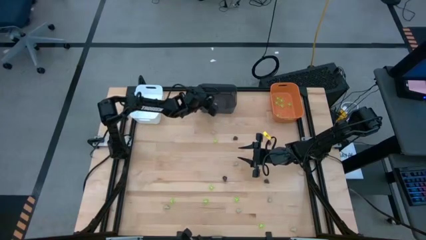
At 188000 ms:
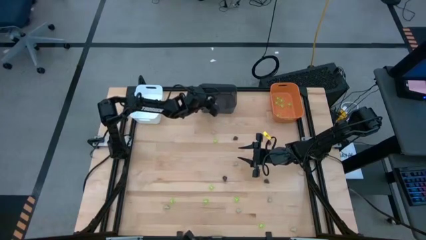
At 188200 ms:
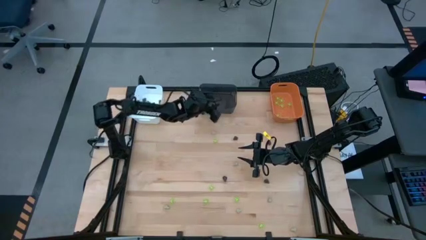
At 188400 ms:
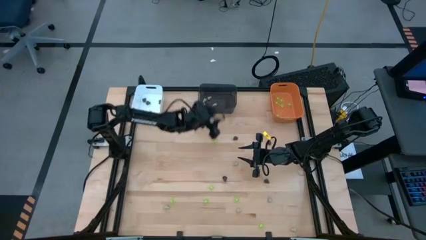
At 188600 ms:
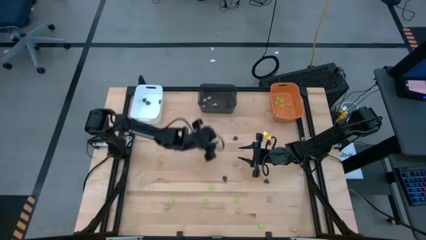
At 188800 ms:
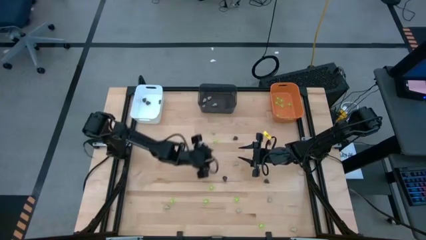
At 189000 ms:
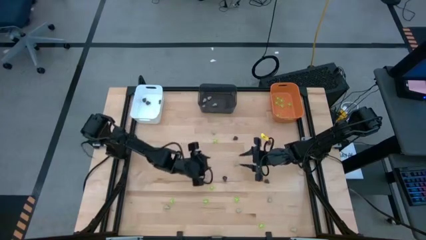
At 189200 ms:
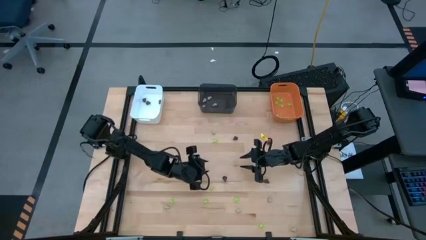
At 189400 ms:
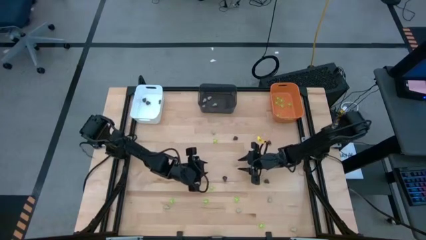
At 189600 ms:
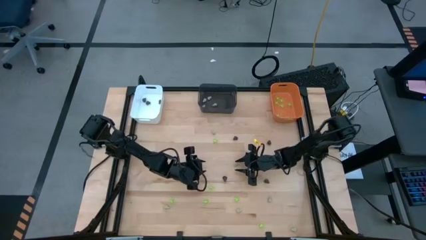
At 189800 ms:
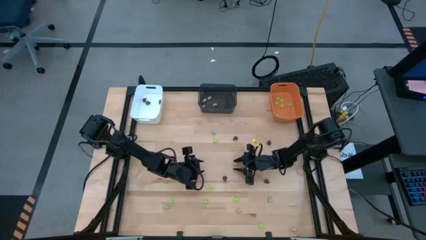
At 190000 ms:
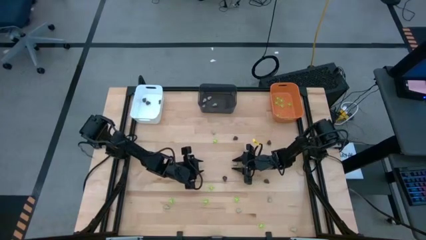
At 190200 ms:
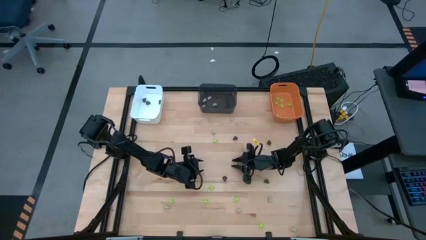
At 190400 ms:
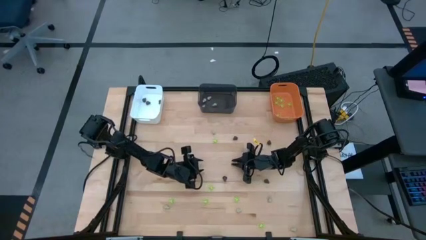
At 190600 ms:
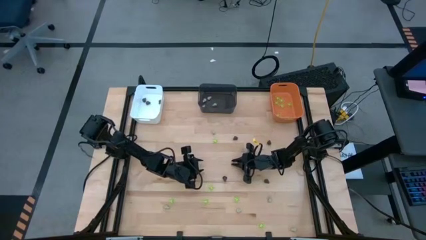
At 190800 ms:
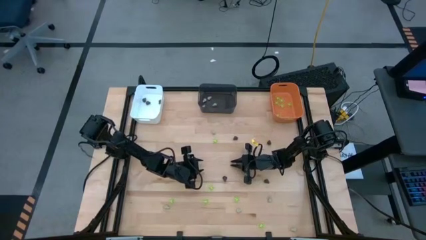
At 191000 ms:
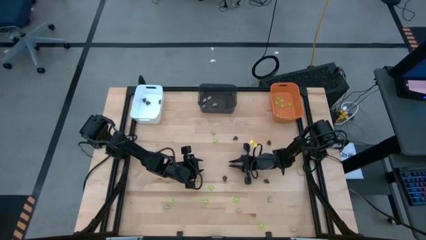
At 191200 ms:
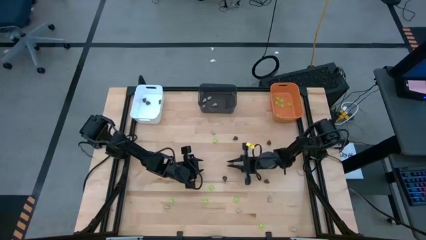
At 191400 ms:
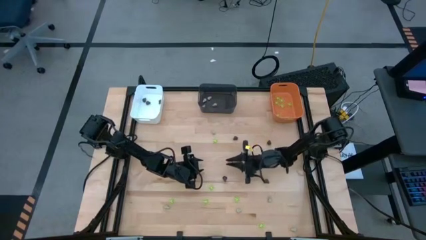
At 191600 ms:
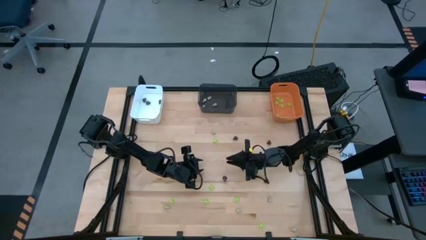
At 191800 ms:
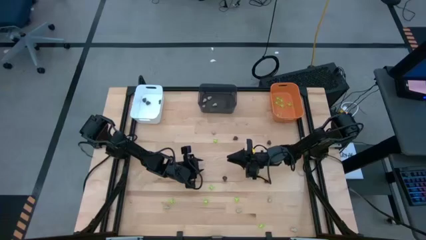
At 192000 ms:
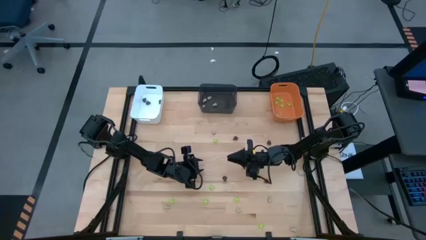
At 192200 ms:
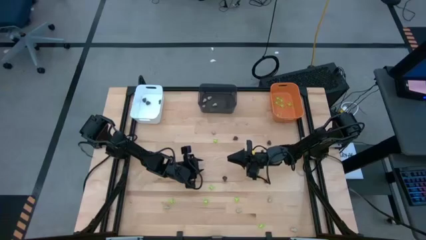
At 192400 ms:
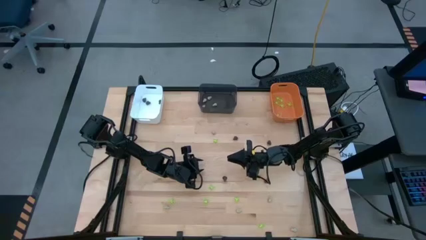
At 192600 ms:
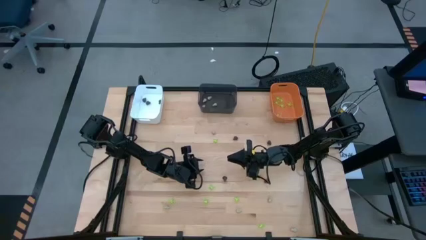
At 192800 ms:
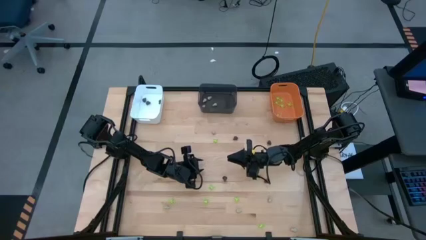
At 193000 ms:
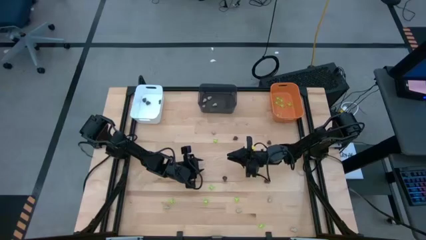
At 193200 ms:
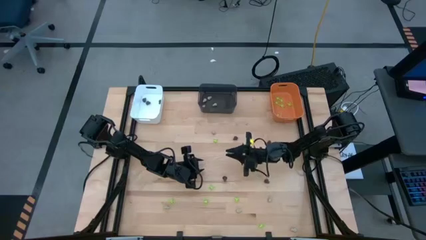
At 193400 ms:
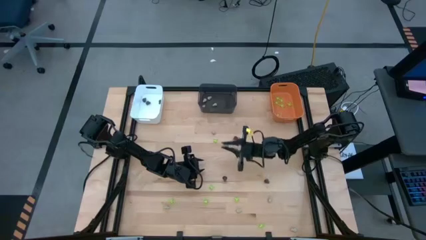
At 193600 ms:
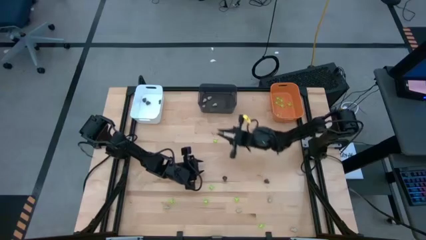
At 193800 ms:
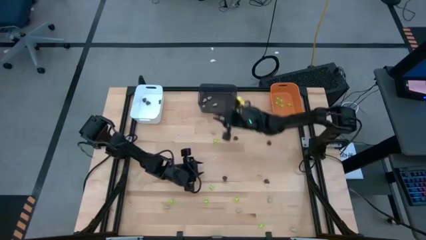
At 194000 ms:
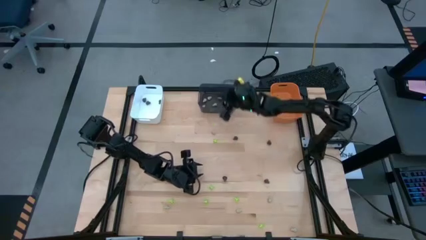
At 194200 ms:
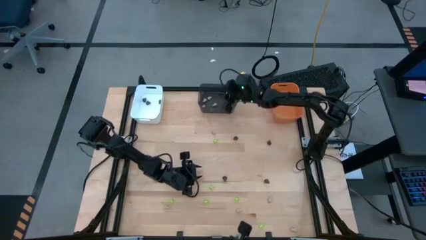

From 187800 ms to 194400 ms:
Task: Sort Halloween decoration
Put the white toy skull into the black bin

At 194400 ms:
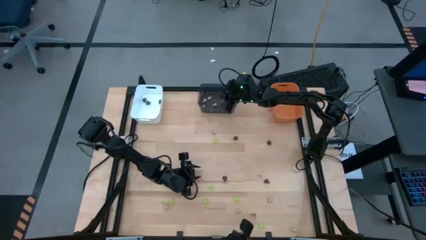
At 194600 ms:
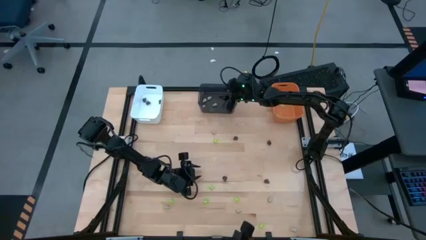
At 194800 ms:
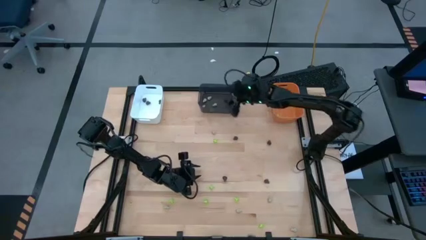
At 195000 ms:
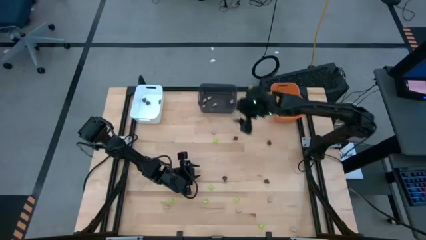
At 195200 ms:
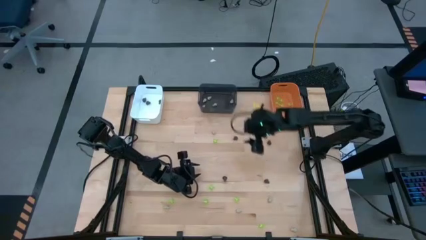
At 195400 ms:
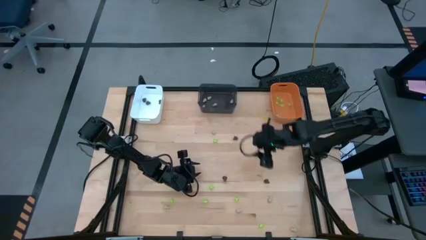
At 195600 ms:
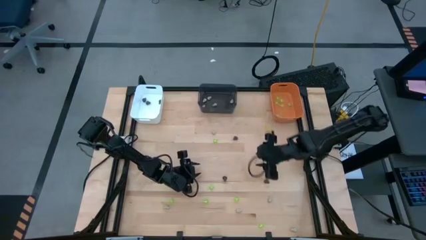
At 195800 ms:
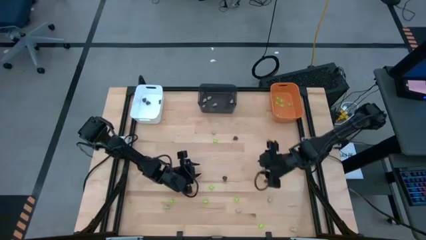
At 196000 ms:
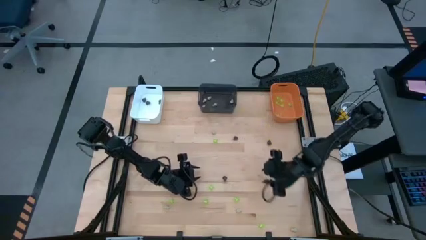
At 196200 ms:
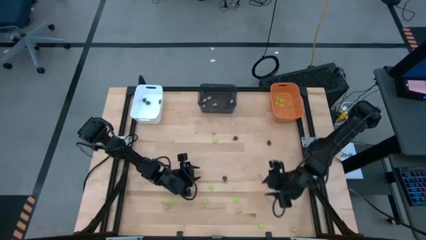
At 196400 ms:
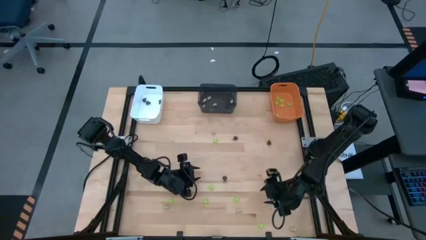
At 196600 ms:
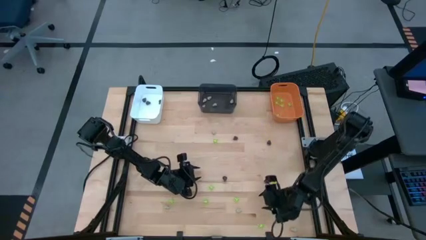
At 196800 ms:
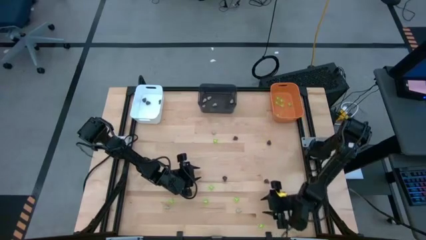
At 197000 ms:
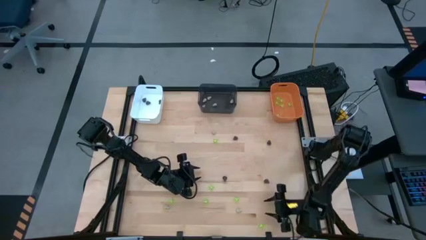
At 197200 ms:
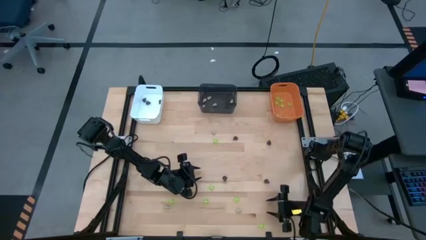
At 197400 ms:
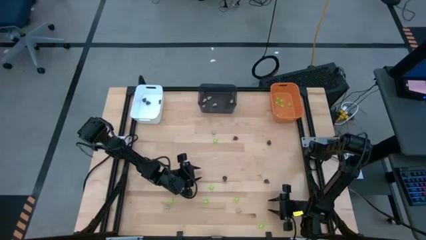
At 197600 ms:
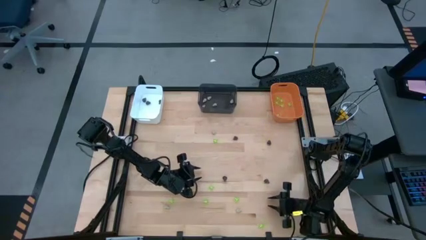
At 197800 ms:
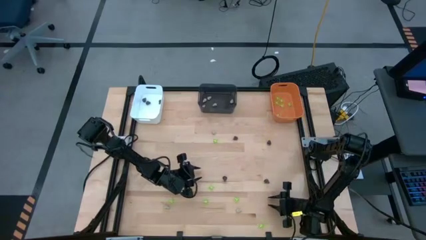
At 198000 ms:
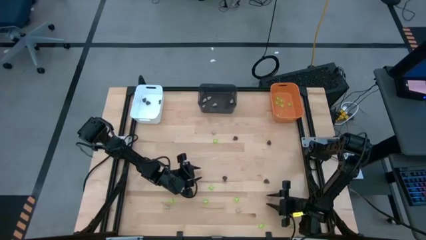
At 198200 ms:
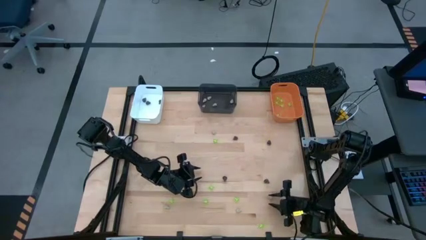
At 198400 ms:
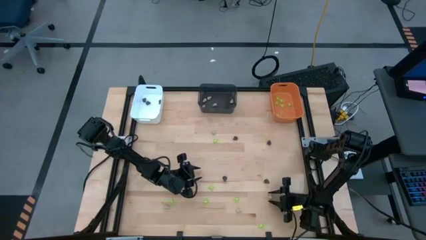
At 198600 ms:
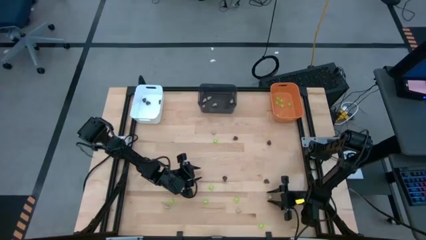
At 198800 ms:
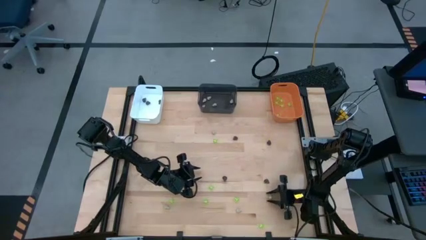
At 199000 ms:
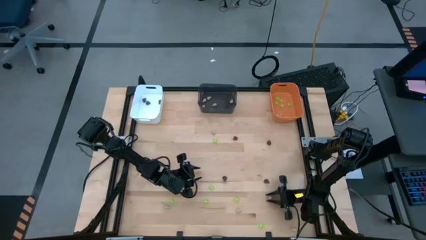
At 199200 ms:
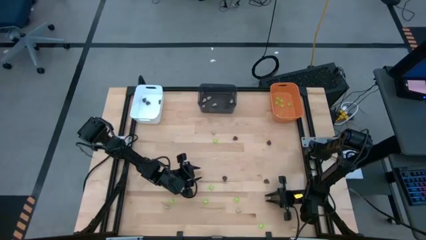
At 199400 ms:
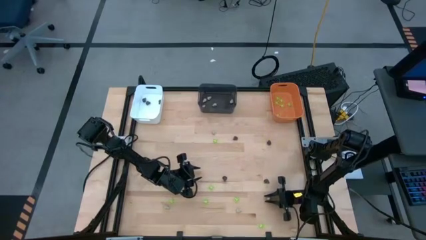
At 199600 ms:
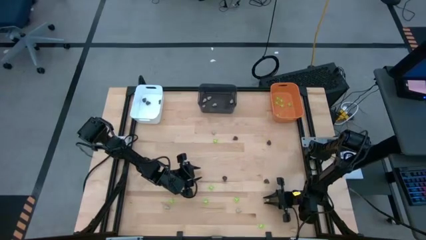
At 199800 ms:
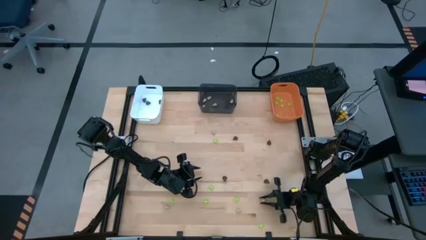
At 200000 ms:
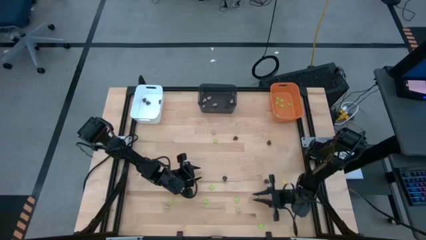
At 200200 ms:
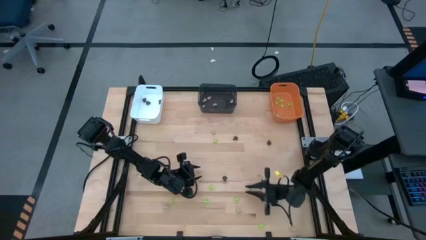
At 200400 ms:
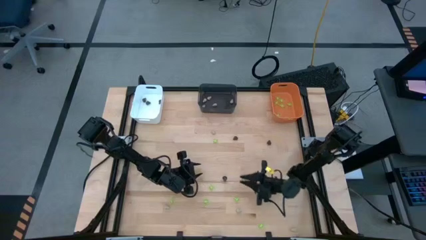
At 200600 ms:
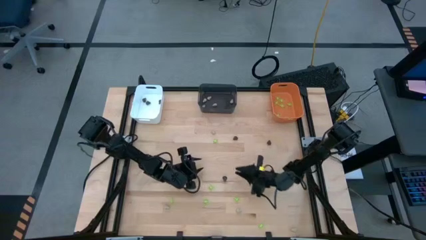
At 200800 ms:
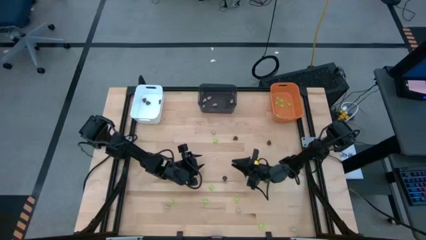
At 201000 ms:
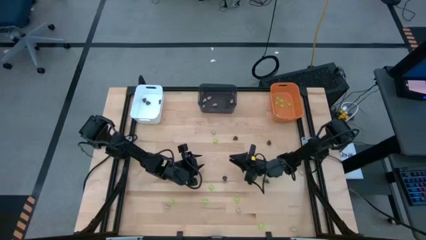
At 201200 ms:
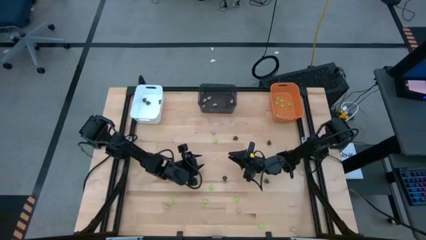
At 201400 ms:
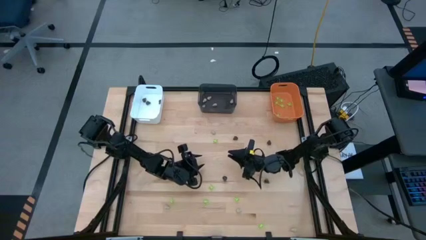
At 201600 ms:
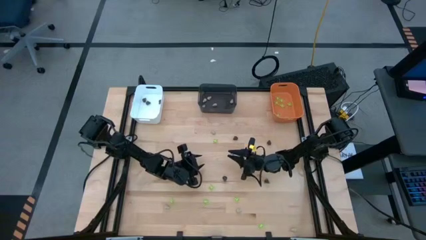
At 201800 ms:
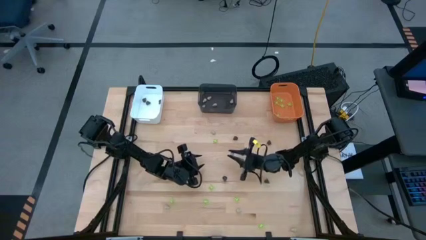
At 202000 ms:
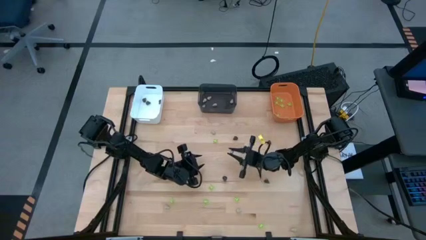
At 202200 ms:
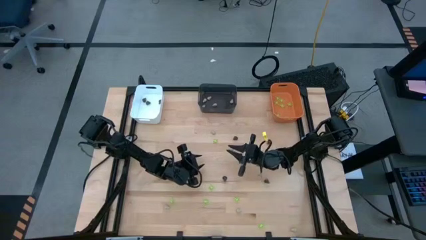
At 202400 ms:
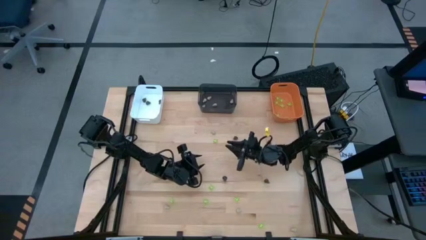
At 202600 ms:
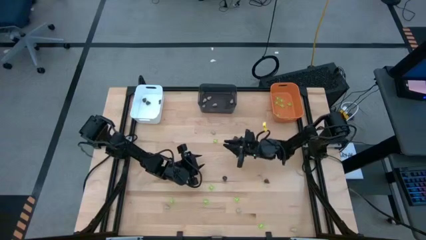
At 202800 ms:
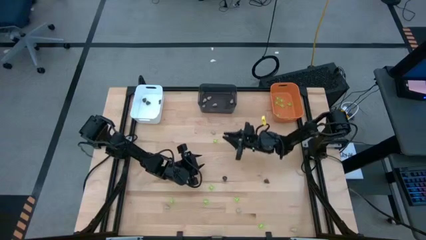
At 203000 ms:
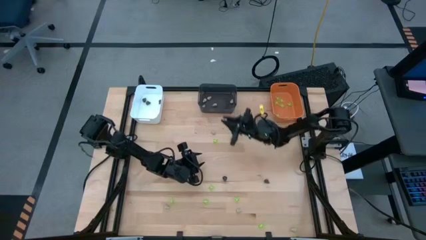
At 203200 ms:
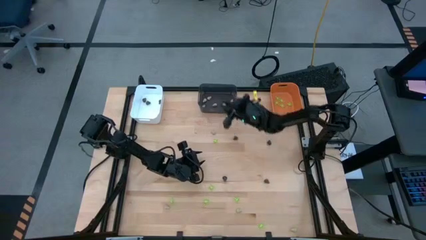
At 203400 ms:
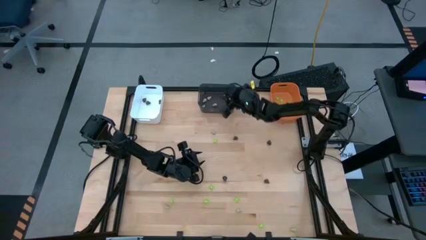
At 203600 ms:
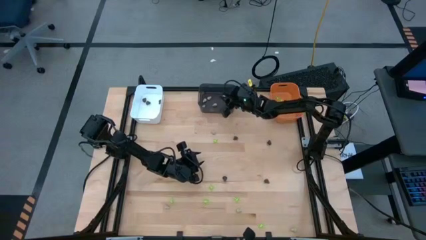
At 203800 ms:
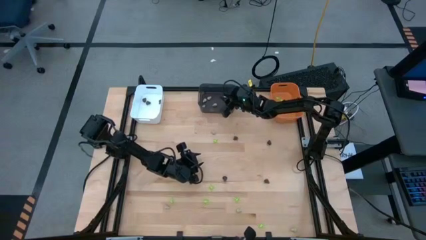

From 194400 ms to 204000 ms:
Put the white toy skull into the black bin
